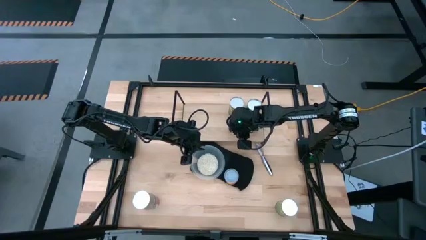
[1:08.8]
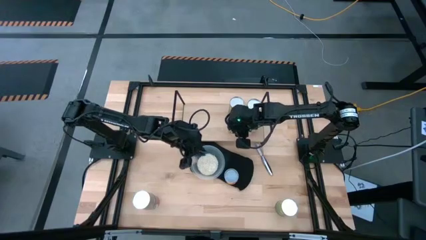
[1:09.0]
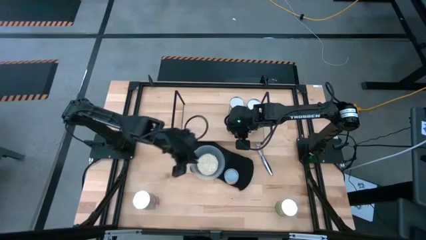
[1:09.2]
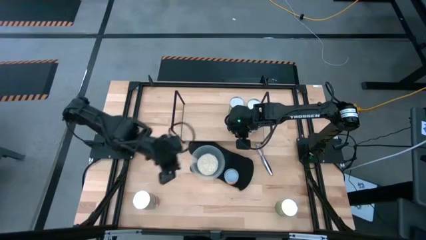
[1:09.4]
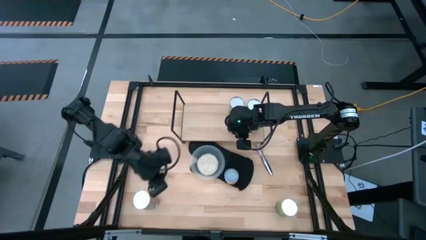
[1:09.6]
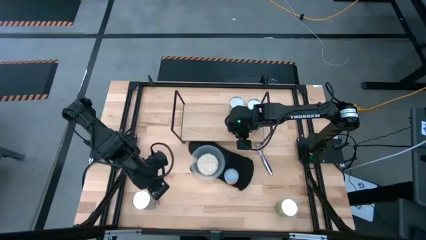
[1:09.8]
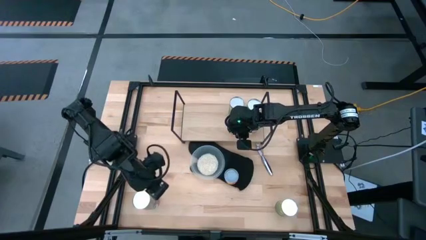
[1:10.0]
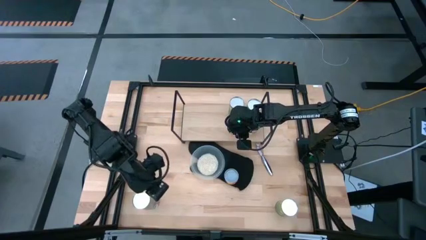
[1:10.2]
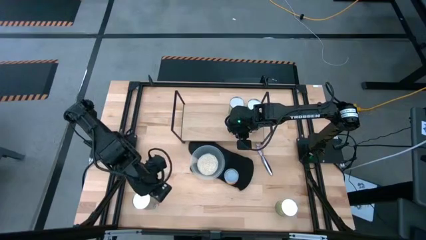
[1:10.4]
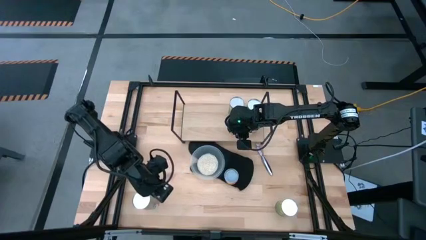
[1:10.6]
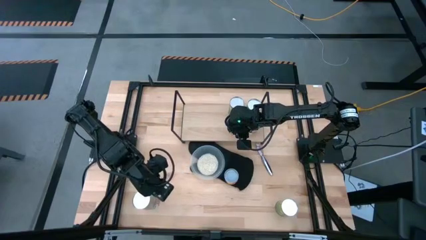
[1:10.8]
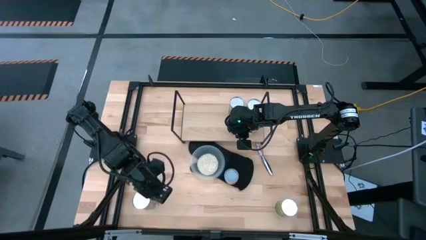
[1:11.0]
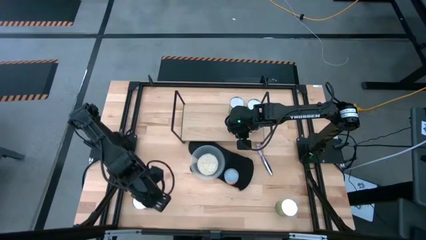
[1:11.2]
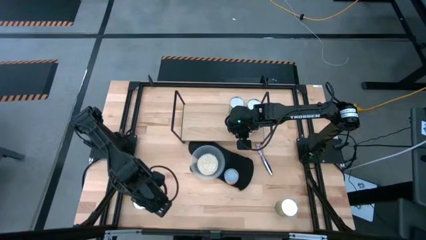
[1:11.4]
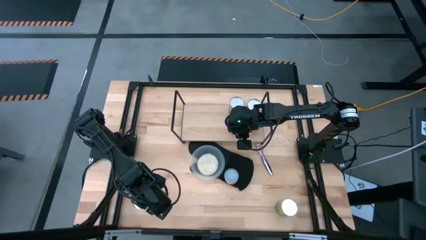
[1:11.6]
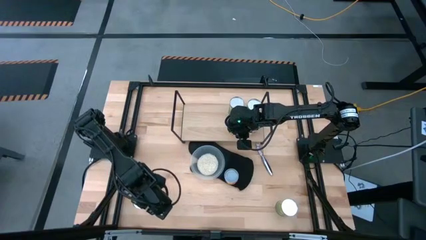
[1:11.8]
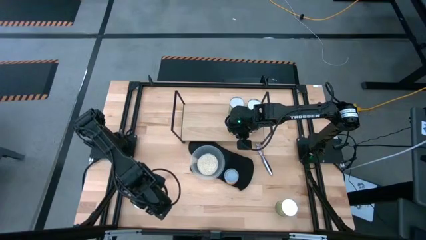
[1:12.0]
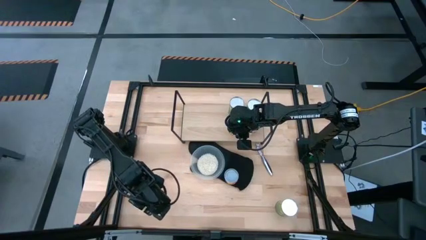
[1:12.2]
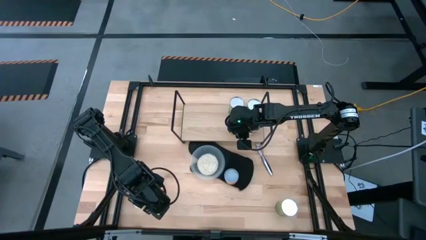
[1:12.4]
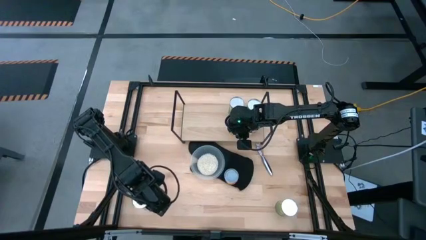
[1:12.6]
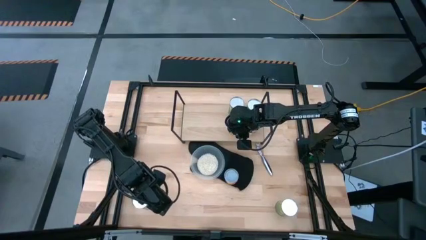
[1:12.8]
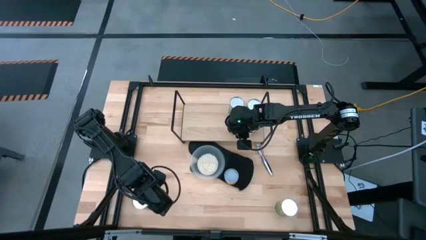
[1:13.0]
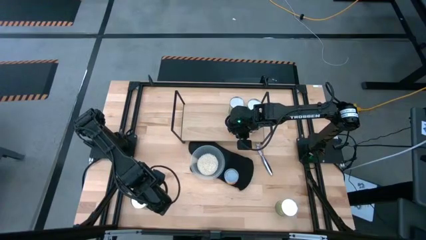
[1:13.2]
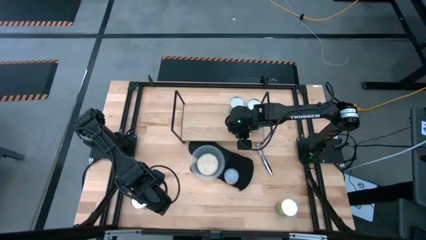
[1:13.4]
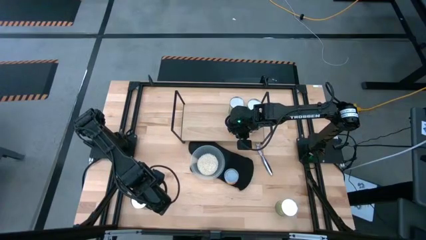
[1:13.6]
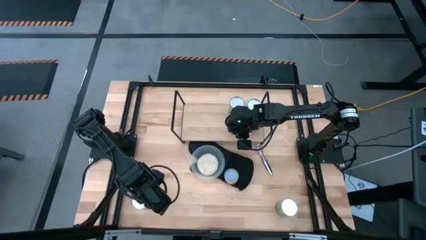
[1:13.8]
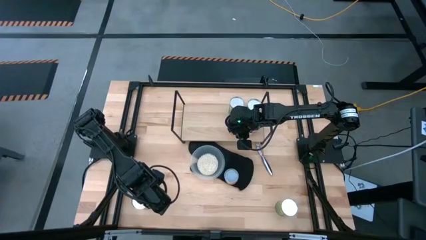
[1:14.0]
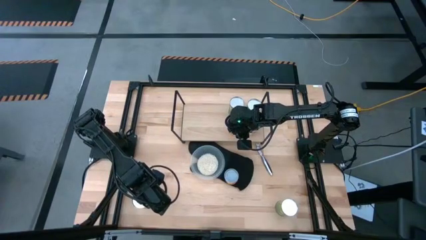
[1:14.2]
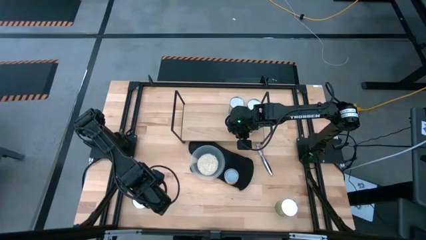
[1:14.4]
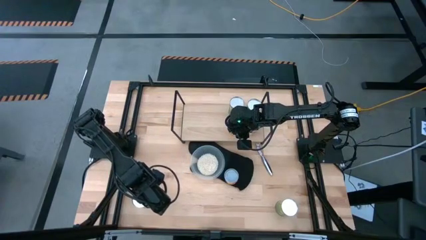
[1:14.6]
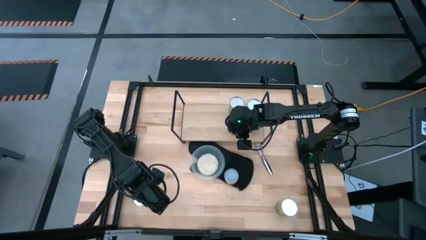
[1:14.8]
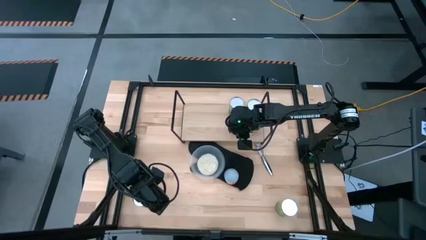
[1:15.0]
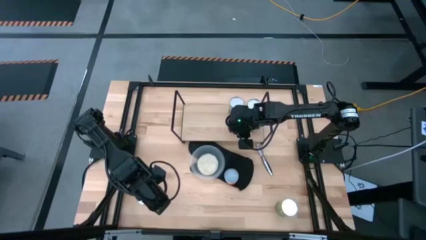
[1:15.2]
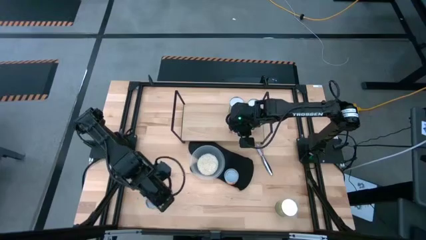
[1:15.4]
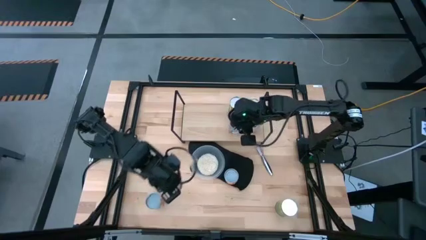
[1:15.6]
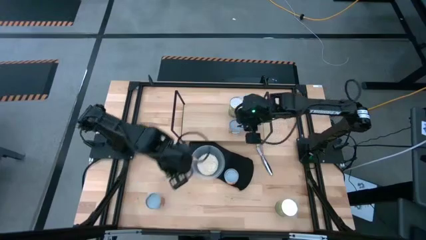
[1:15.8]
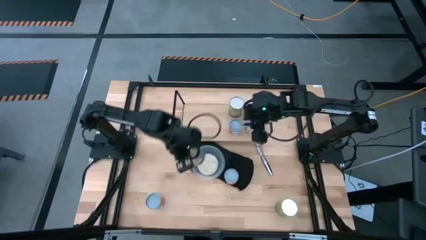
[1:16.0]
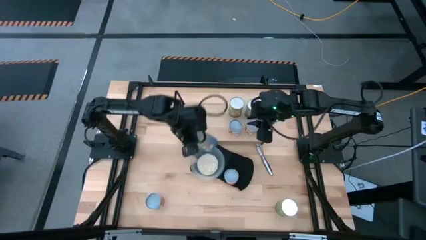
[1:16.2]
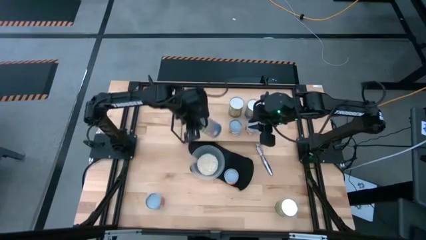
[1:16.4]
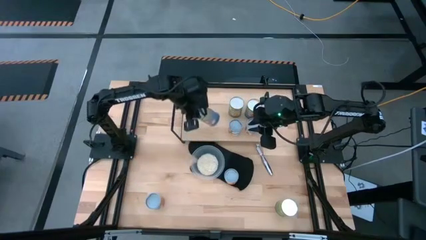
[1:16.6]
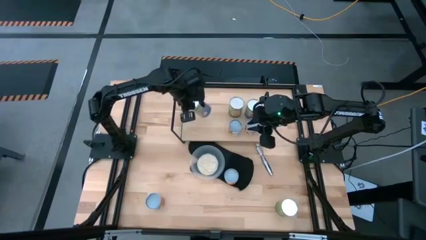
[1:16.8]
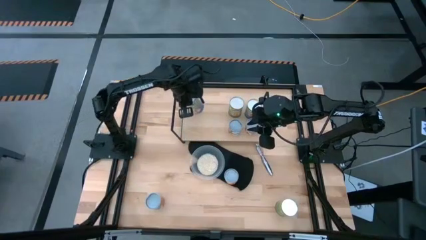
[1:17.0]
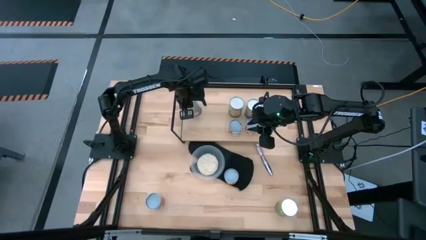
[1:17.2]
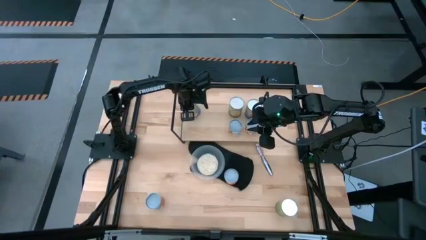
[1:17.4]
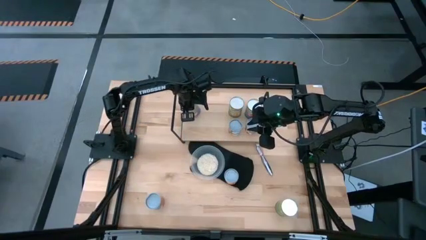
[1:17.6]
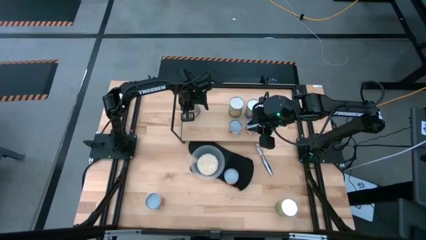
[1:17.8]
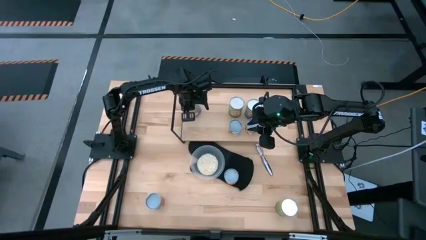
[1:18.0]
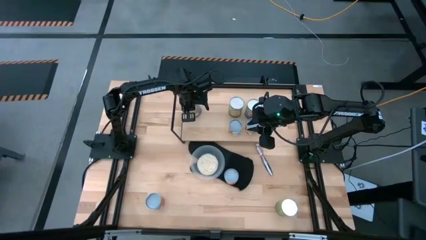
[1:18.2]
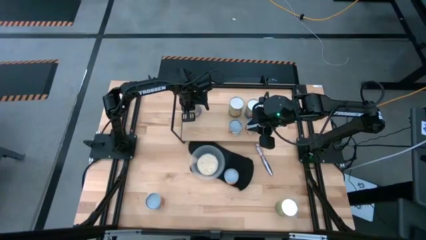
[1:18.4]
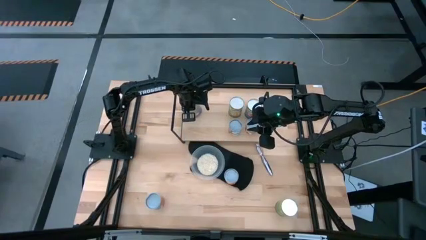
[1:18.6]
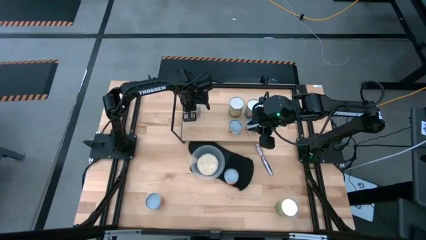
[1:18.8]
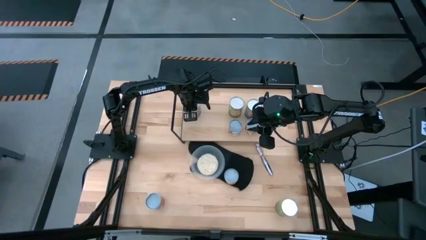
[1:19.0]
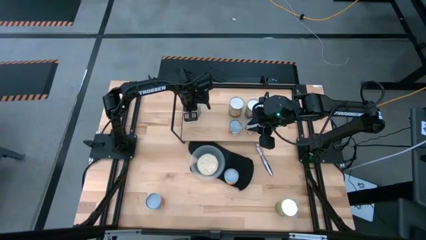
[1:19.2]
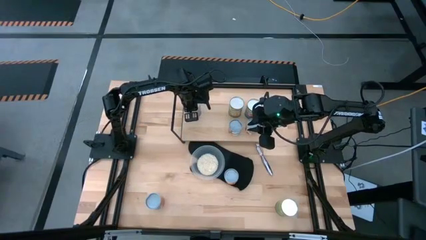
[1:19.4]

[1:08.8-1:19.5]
Task: Pick and place cans onto a shelf
Put the canned peaches on the shelf

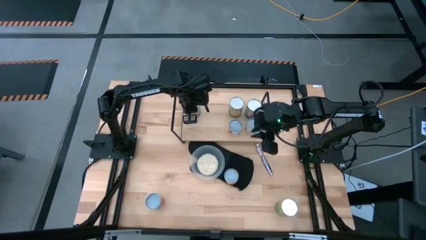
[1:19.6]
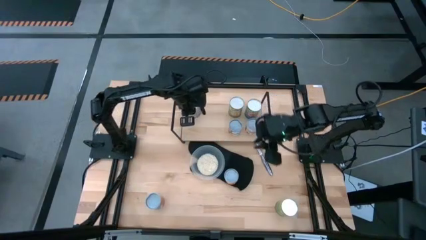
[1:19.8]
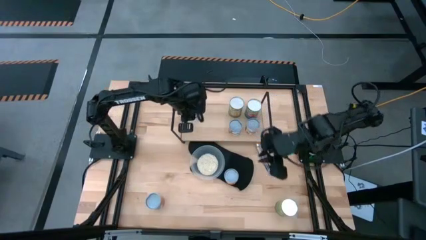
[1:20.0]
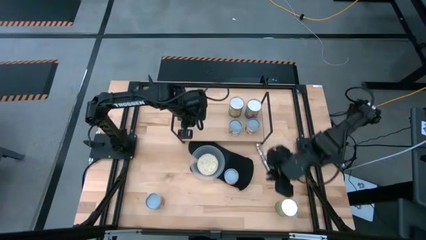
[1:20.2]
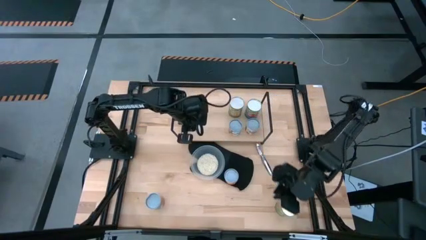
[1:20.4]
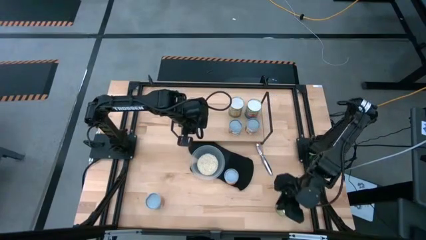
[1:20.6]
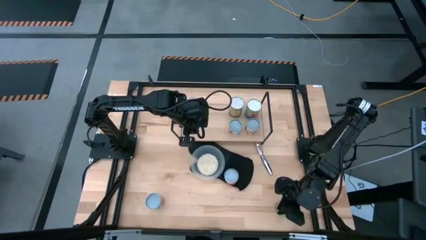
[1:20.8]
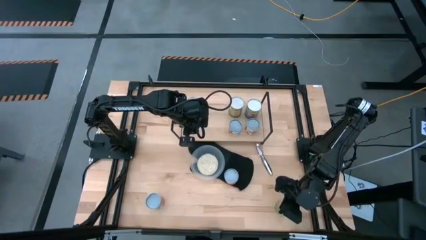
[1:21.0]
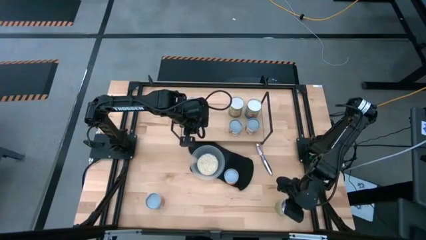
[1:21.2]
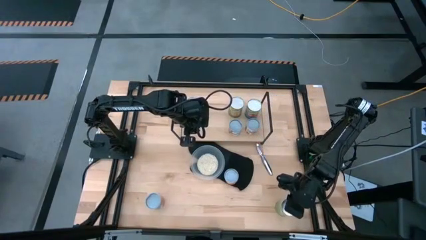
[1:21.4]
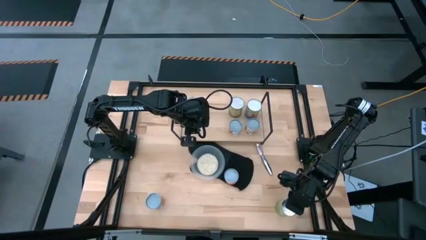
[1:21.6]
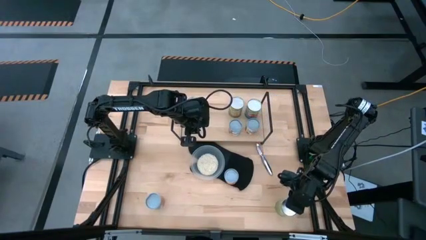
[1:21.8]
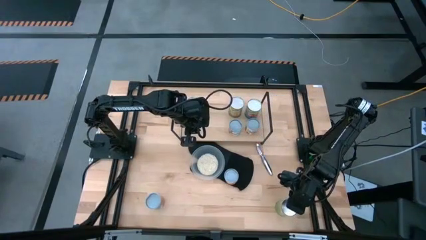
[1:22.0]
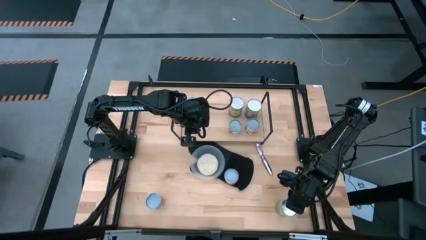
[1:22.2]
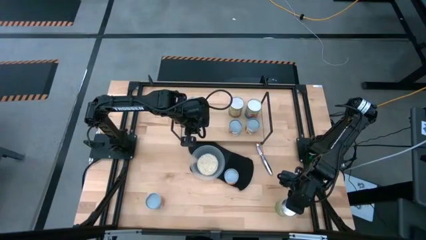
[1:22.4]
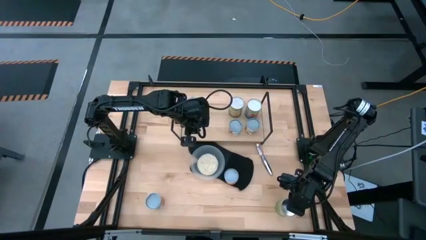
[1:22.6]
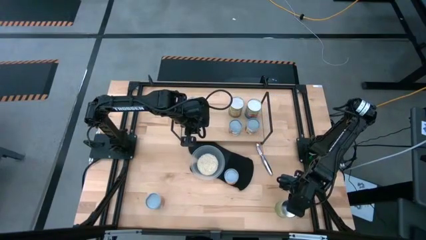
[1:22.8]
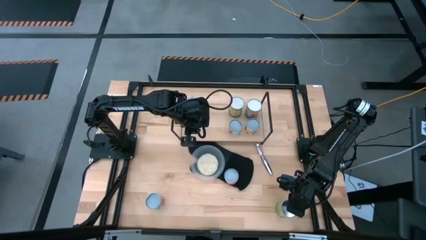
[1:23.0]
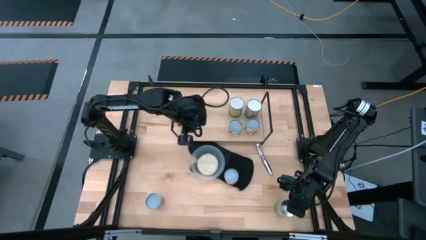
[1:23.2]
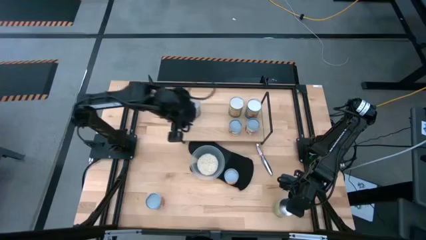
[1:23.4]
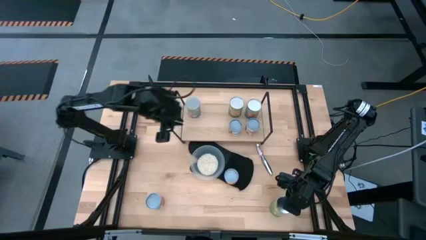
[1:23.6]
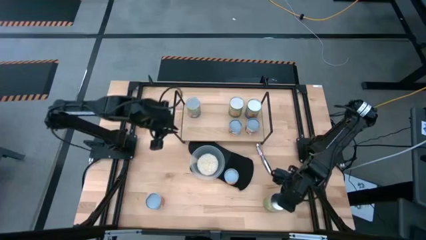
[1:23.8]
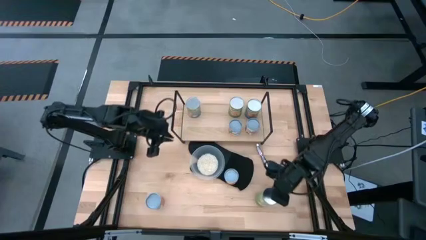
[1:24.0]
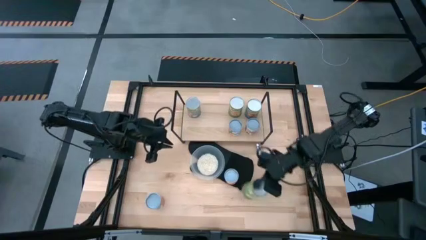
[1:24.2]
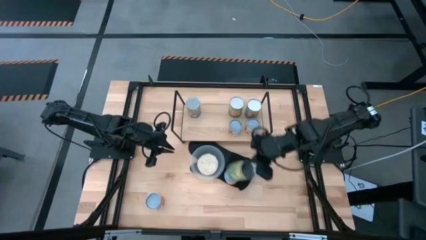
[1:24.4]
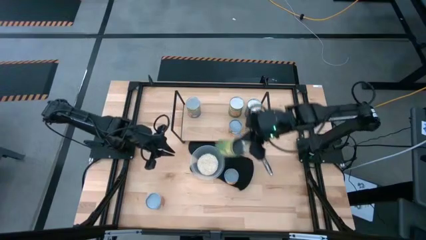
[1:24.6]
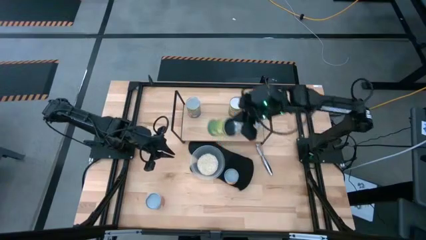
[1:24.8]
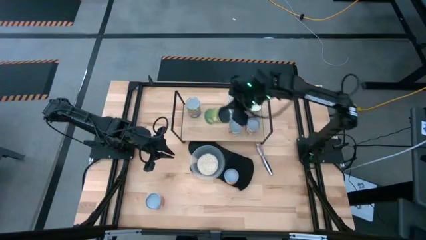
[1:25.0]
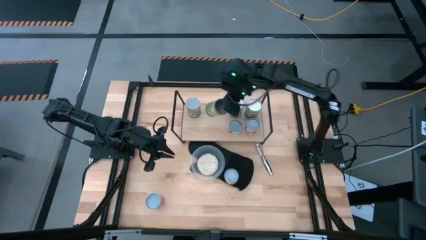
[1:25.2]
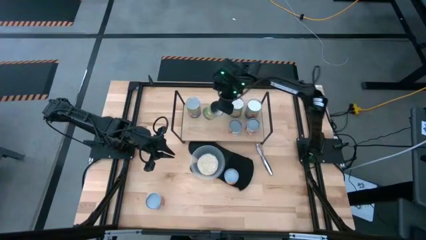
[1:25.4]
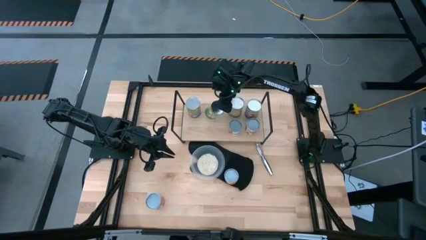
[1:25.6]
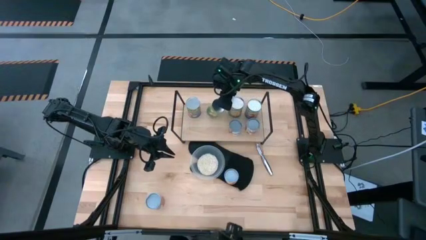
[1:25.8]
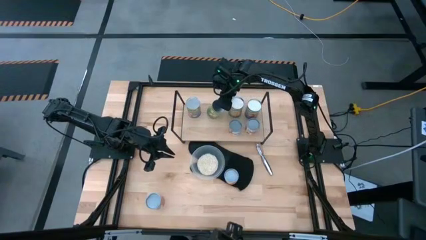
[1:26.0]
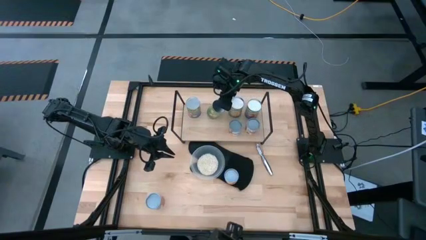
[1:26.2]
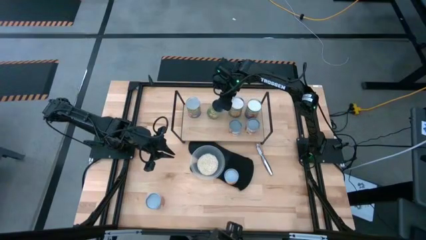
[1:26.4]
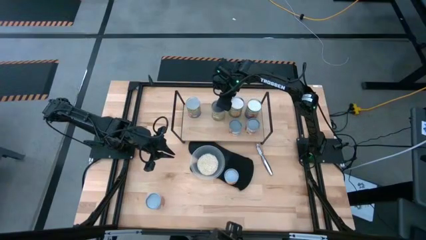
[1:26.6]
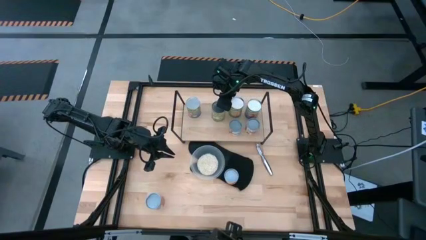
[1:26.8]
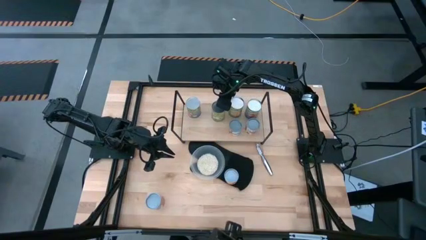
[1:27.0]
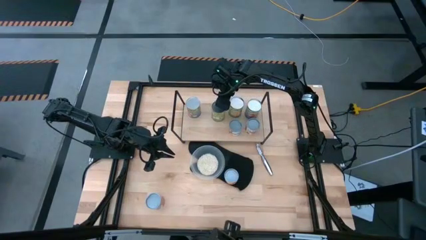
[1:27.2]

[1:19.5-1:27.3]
Put the canned pears on the shelf
